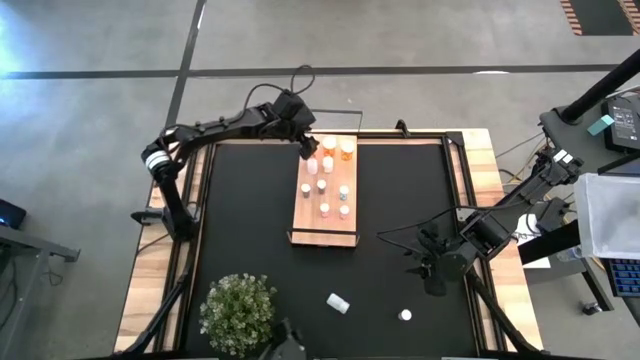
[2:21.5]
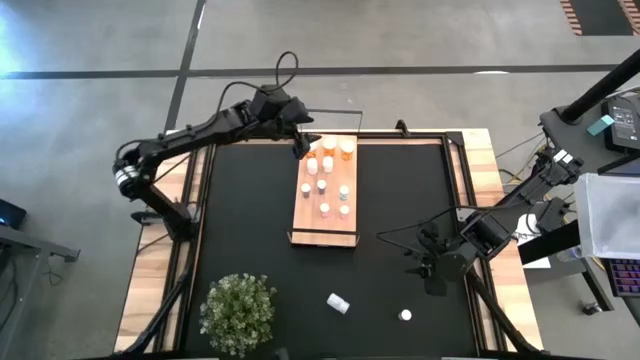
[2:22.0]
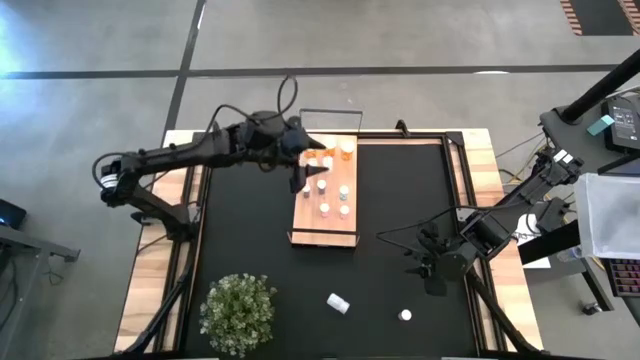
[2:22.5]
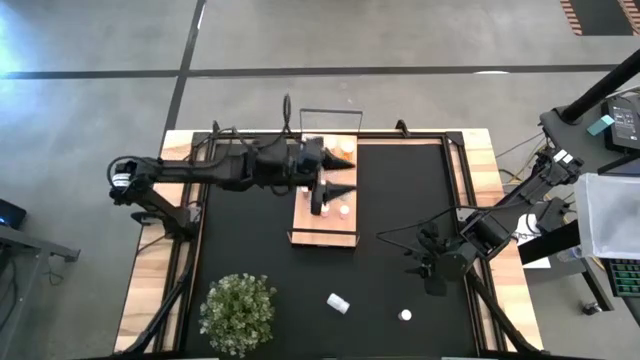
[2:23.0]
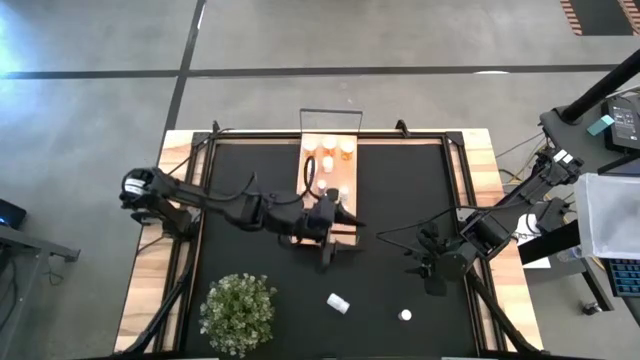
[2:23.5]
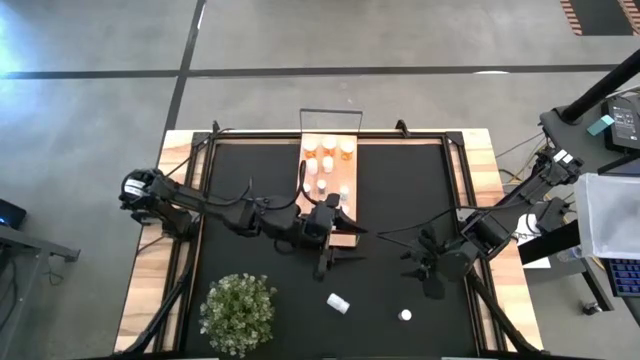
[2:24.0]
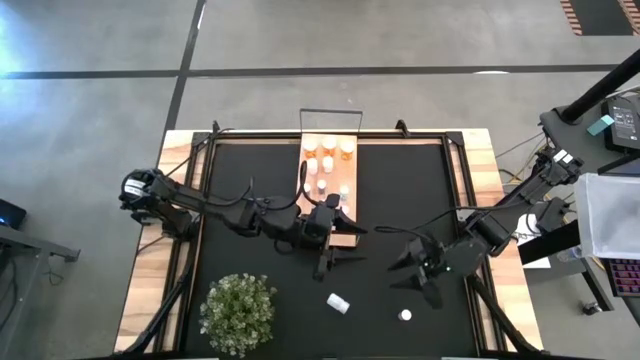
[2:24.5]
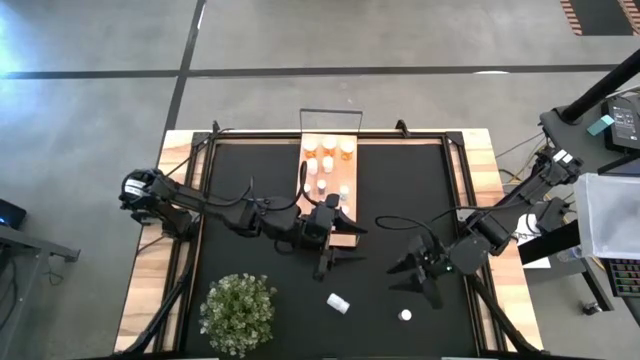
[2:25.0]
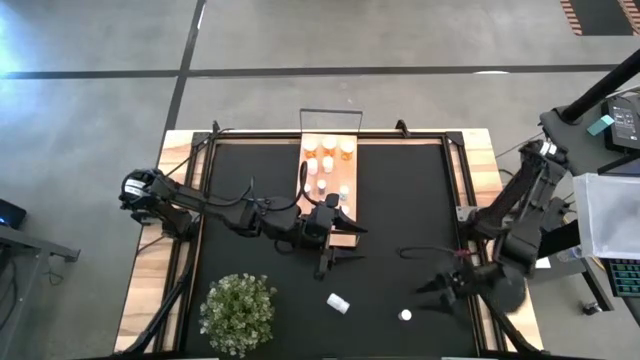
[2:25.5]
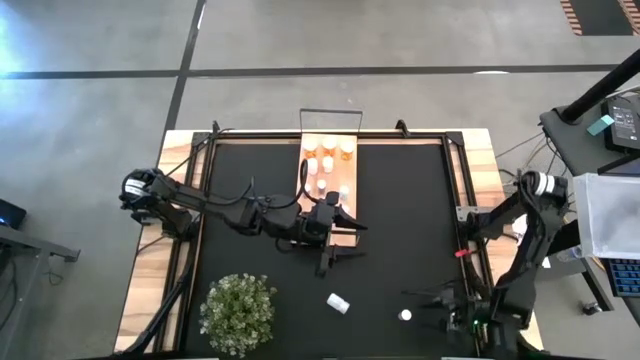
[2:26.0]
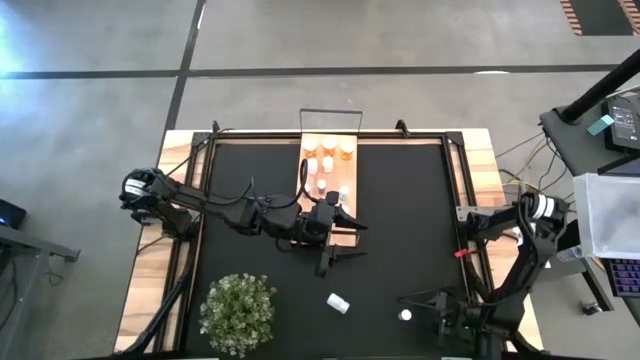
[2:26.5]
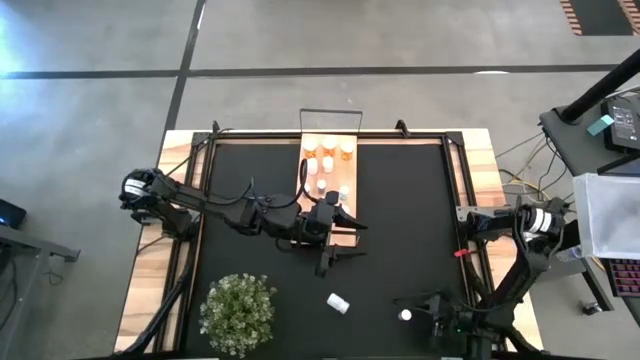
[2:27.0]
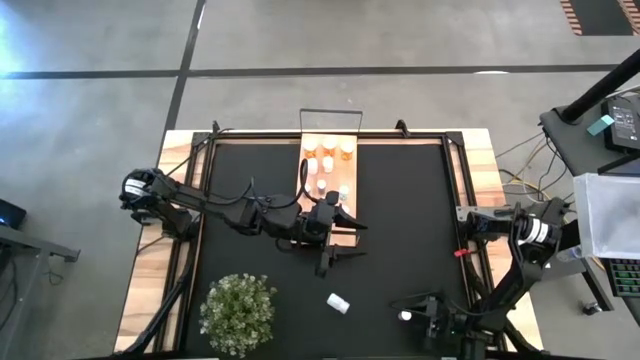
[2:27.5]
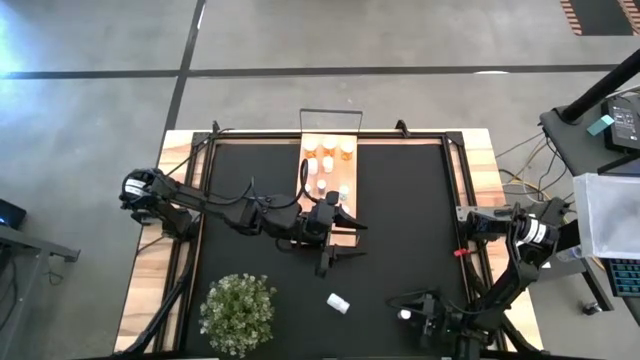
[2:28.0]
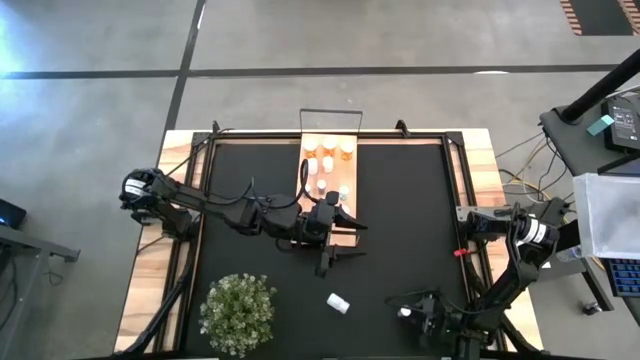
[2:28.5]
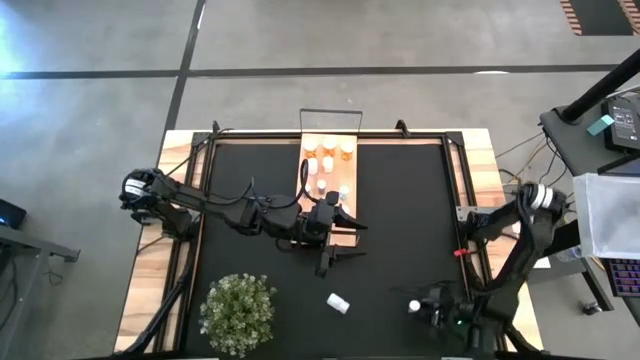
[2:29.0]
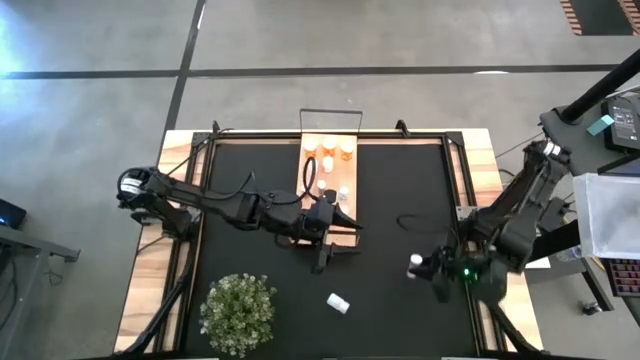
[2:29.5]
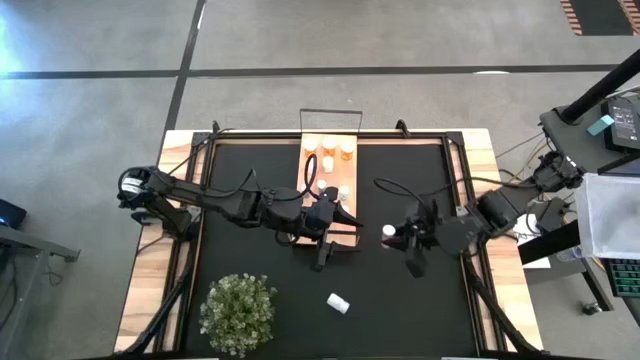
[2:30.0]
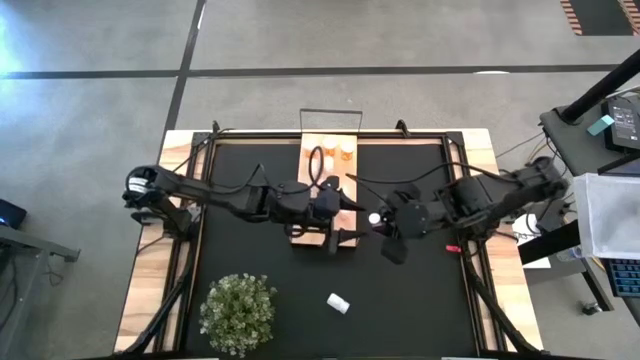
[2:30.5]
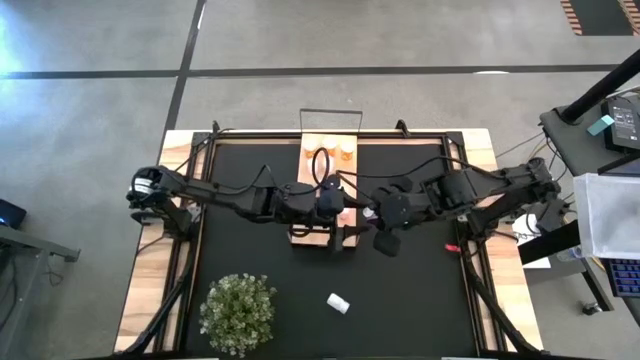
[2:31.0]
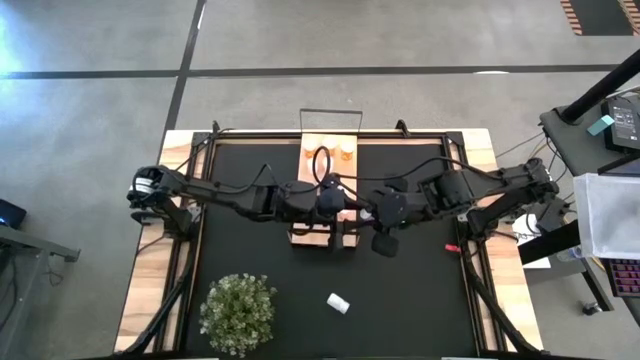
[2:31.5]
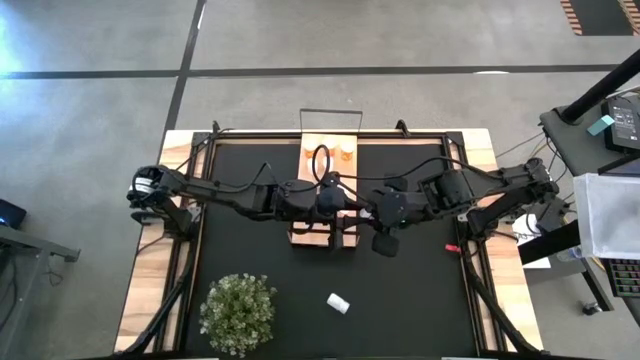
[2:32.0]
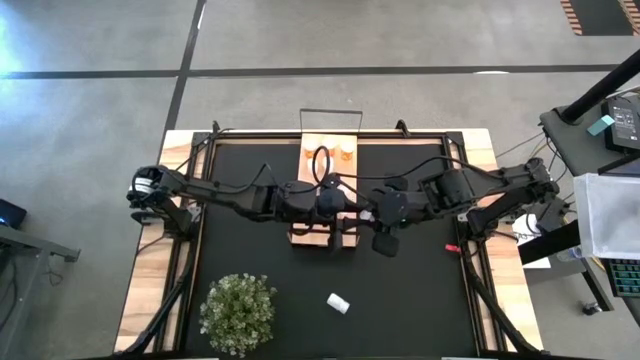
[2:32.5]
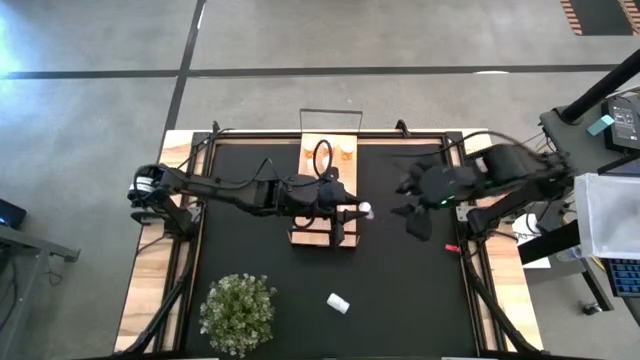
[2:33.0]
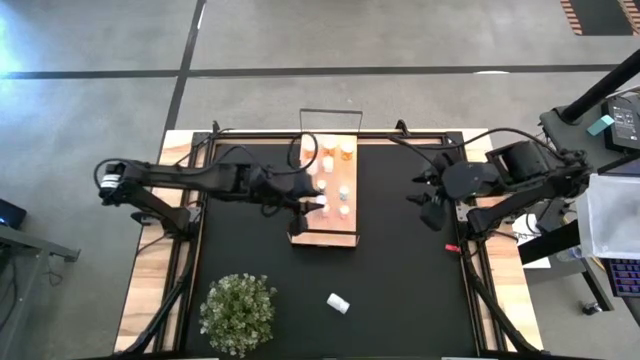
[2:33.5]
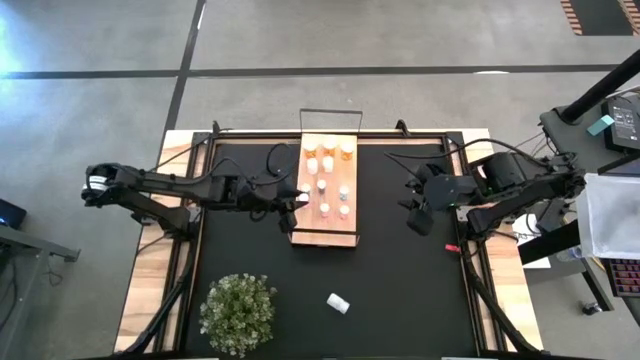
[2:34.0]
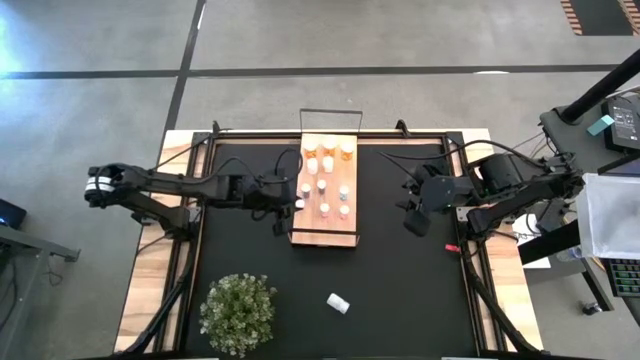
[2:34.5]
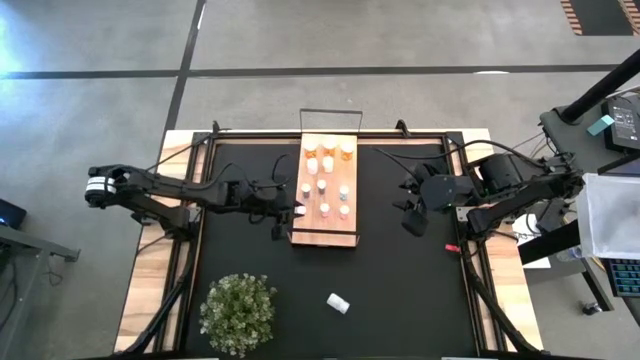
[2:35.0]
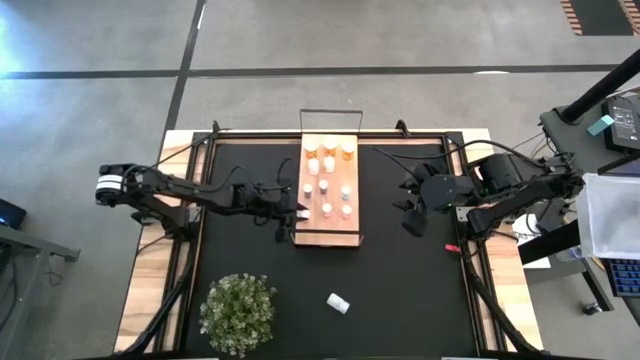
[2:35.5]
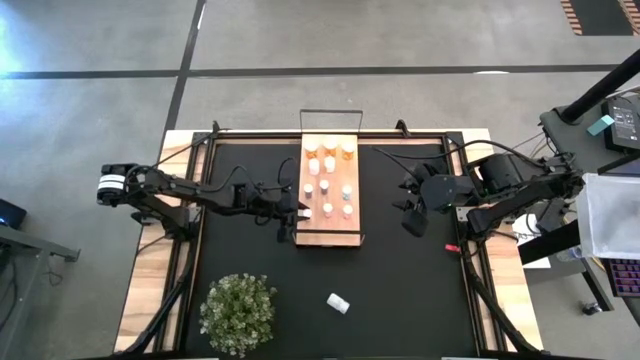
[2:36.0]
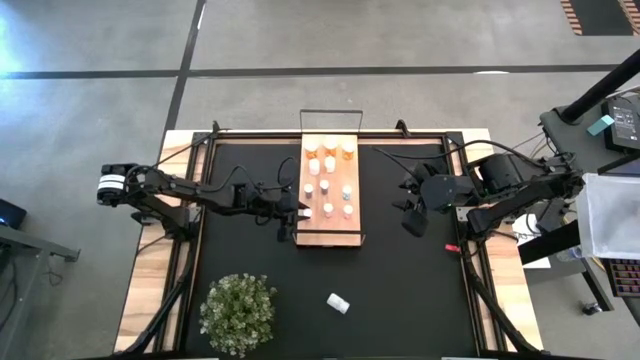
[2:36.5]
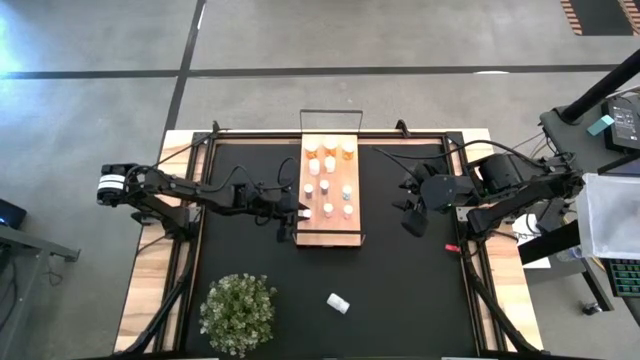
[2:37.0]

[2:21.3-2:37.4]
Task: Pick and place medicine bottles onto shelf by color
Put the pink pill bottle on the shelf aligned with the other pink pill bottle

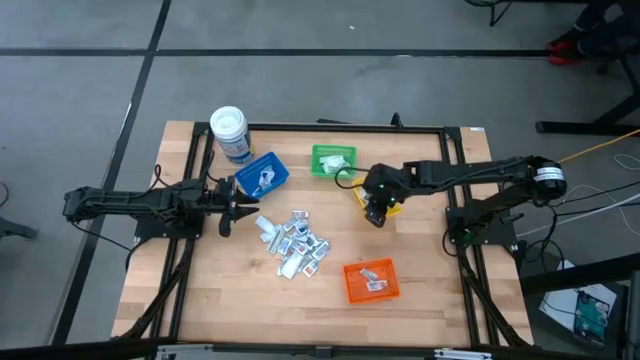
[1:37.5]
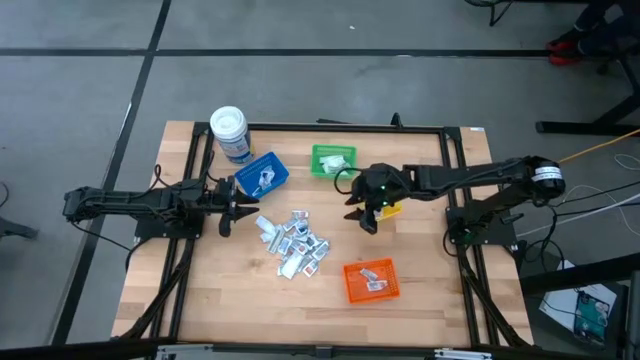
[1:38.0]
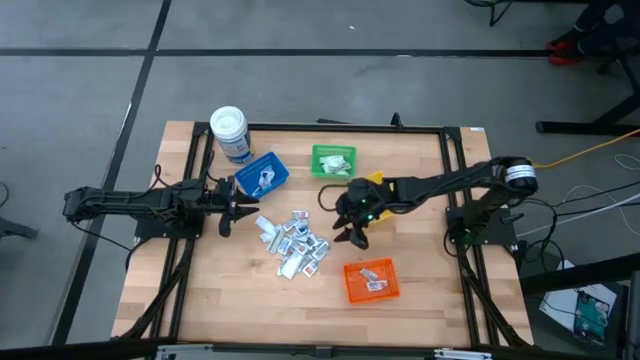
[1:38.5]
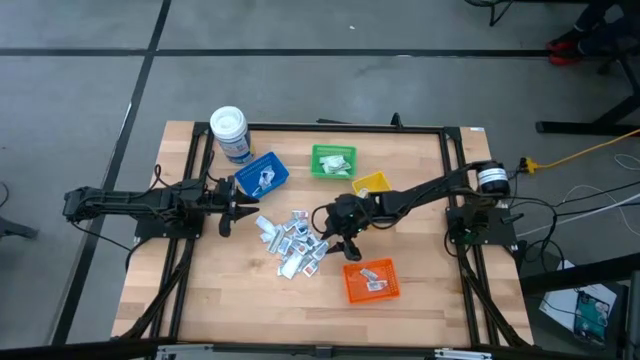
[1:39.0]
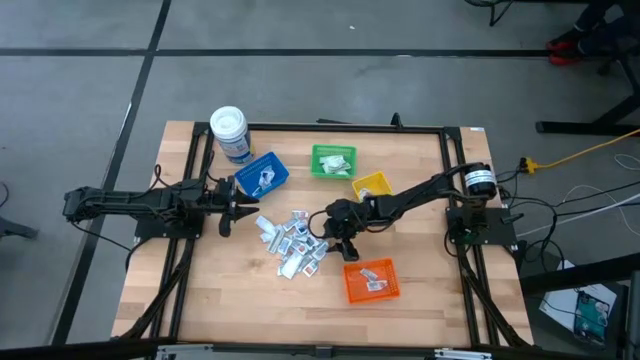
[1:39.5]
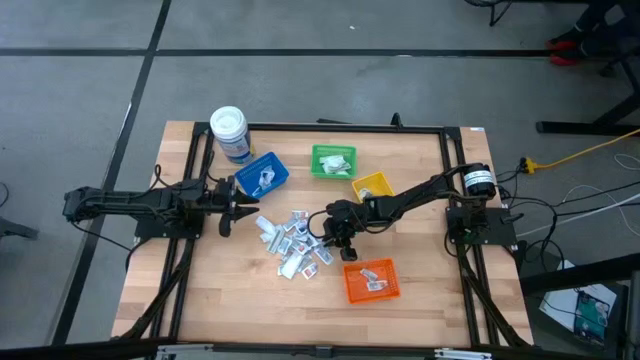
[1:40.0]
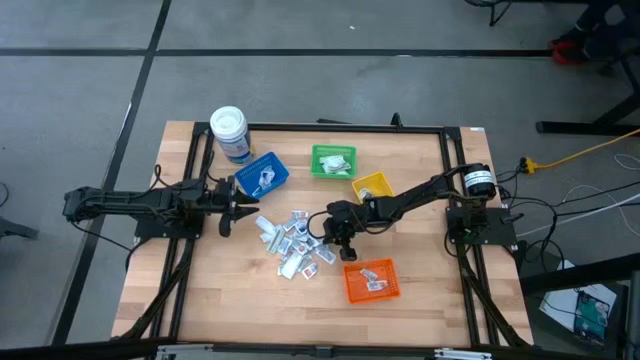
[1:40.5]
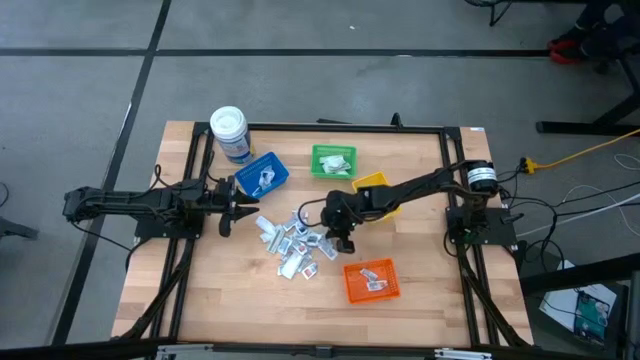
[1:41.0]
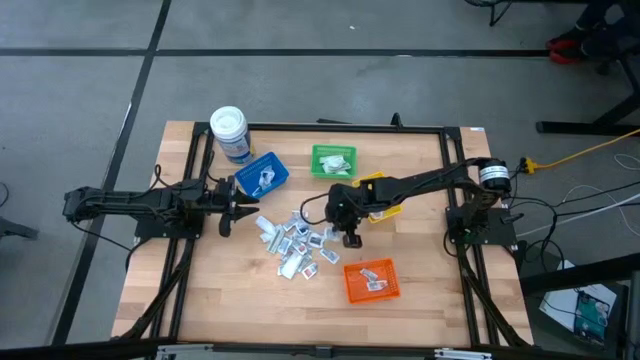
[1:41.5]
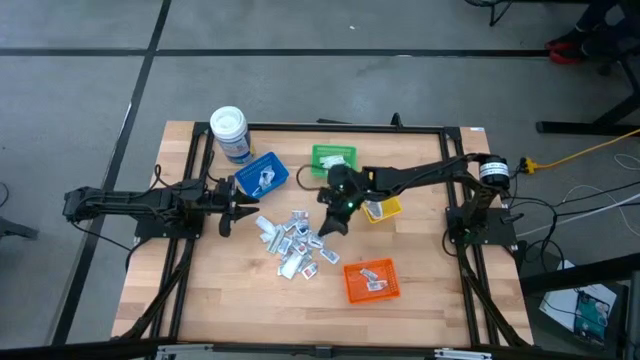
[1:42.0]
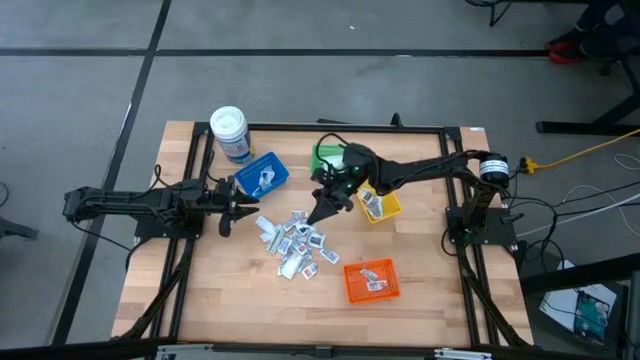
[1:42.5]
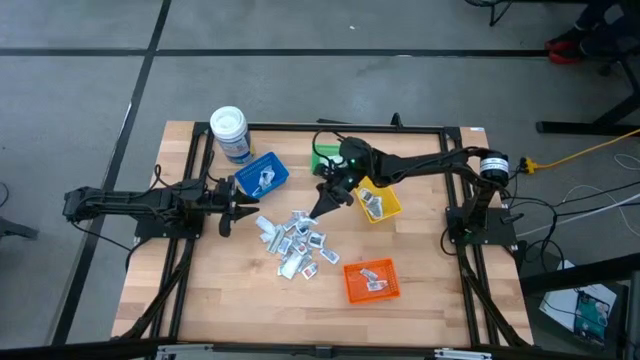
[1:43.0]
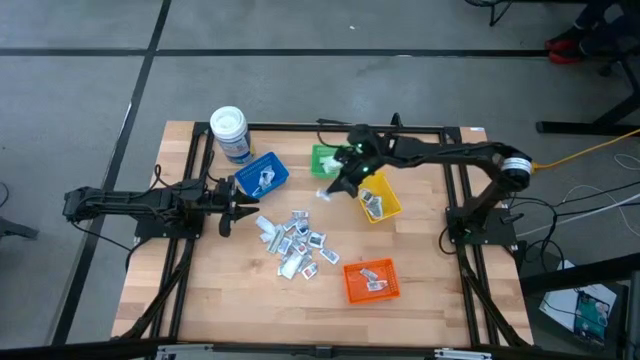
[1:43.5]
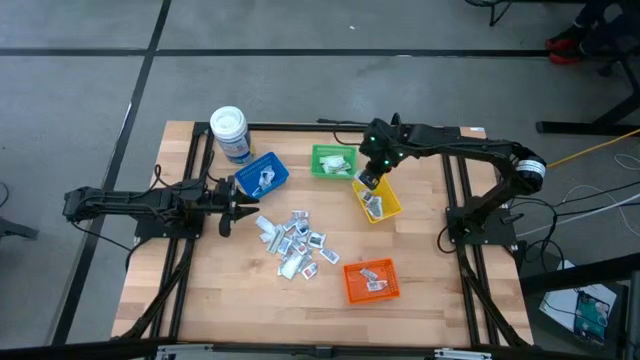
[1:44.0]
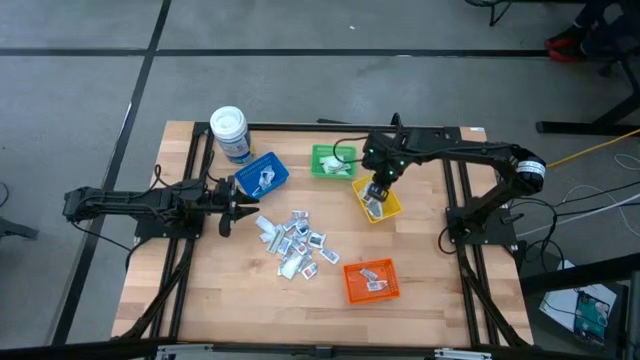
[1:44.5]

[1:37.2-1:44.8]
Task: Pick & Place First Aid Supplies
Put the white towelette pack into the yellow bin
